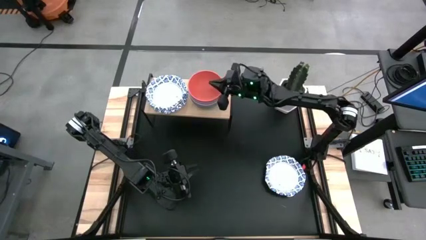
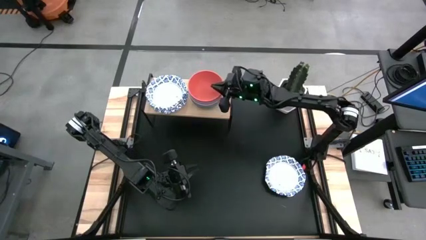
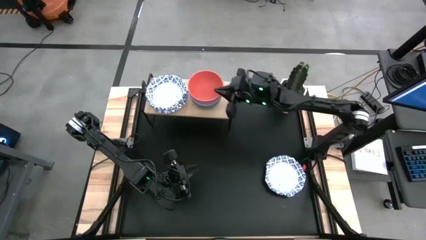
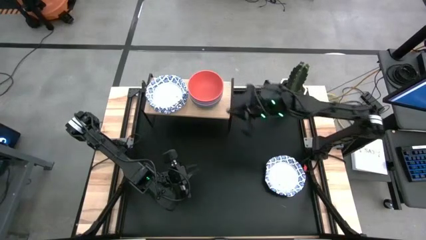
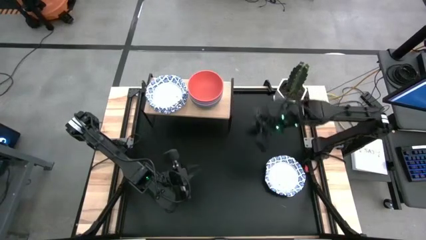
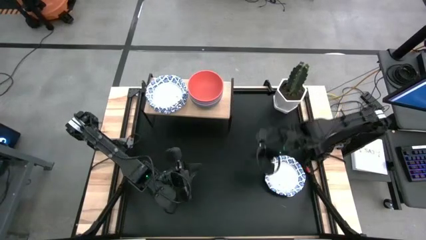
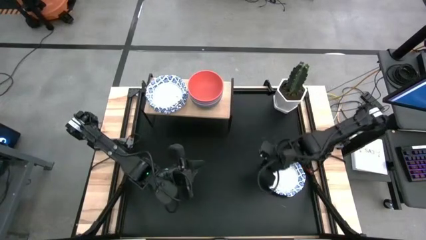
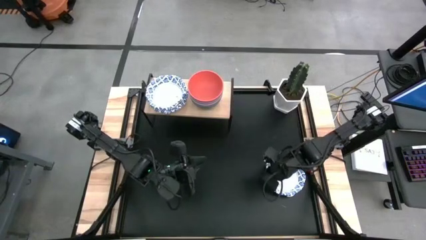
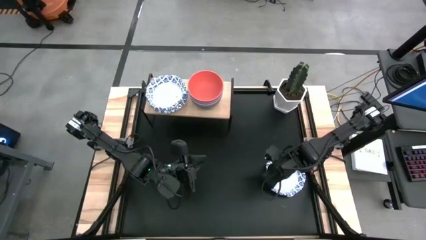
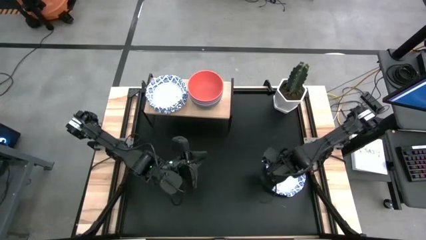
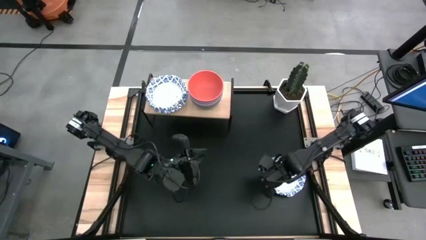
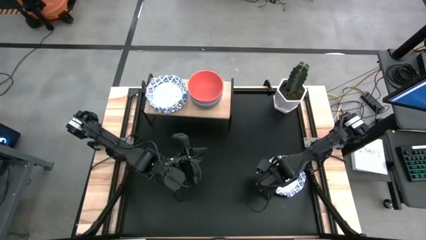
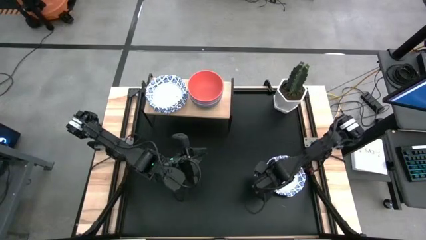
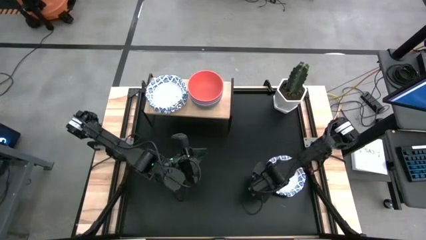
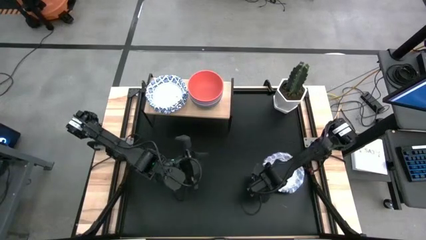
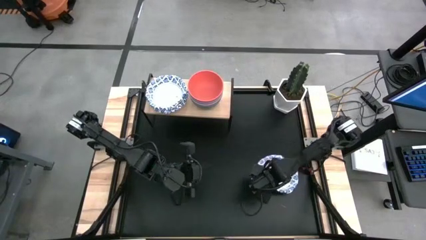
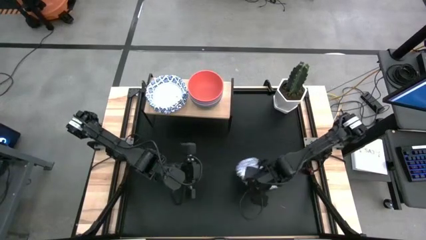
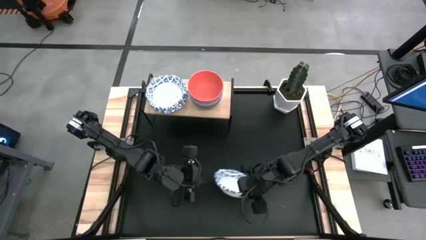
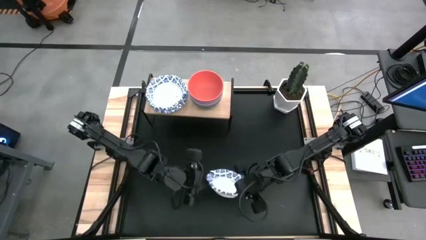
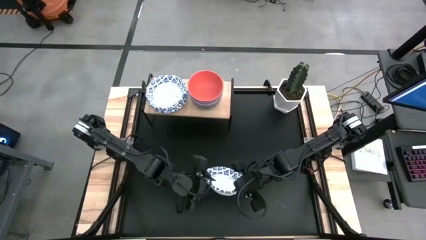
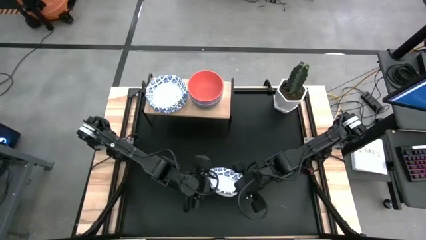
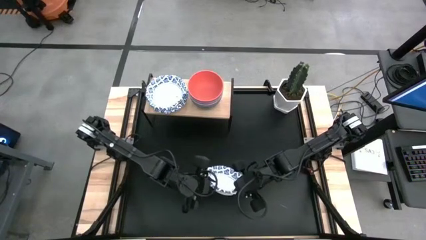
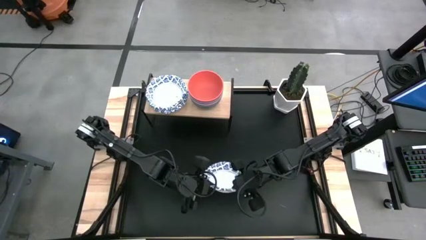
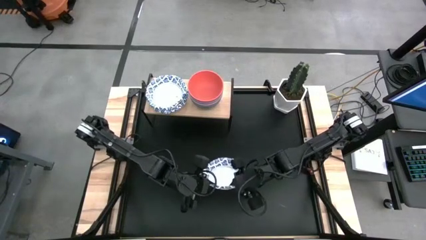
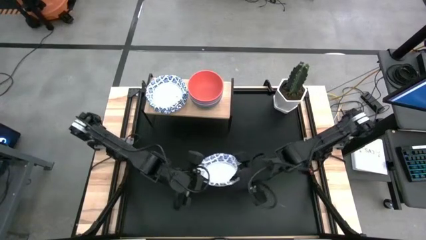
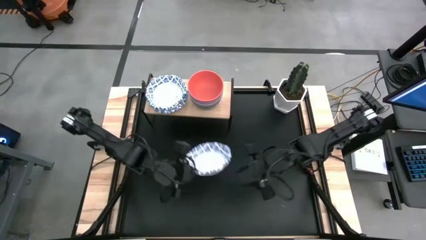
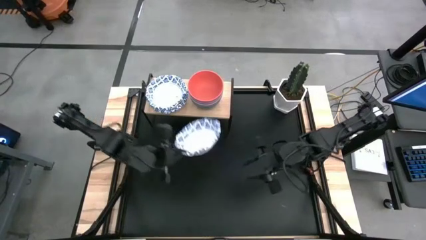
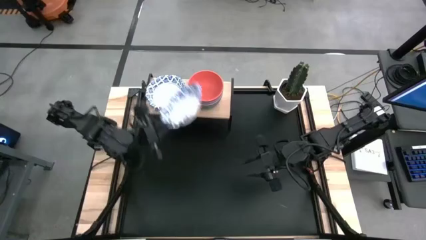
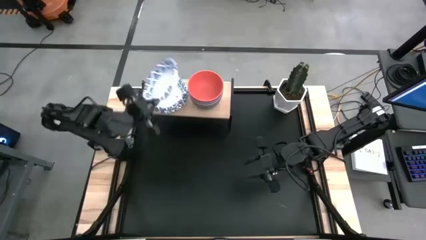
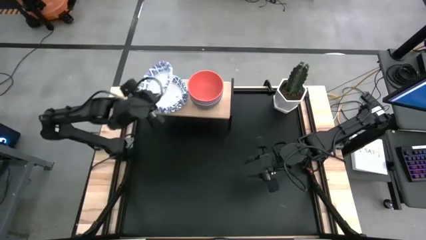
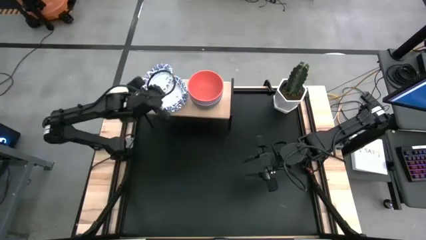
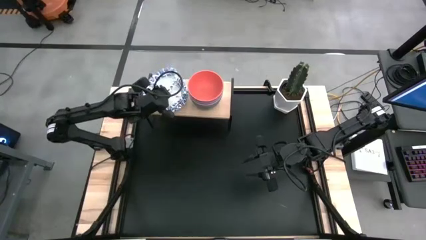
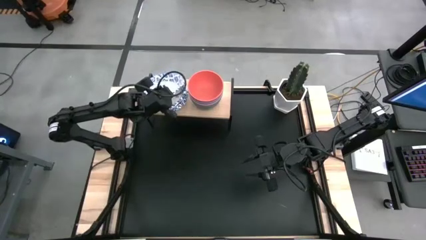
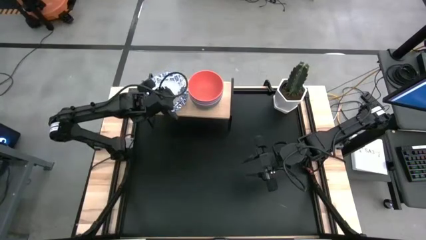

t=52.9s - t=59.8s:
Task: Place and stack bowls onto a shelf
Stack the white patterned bowl on top of the white patterned bowl on the shelf

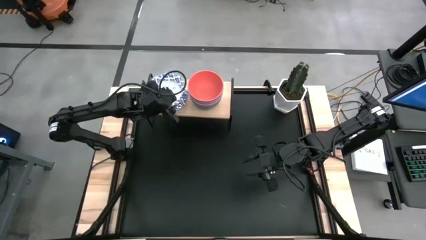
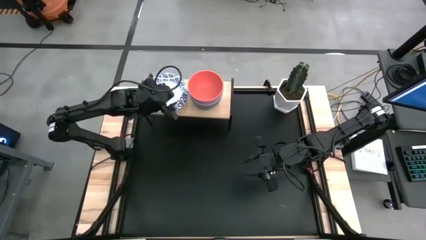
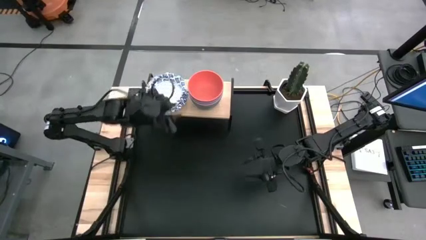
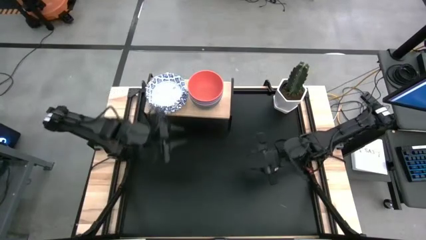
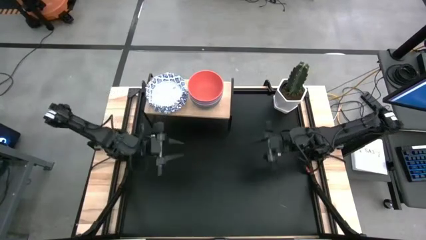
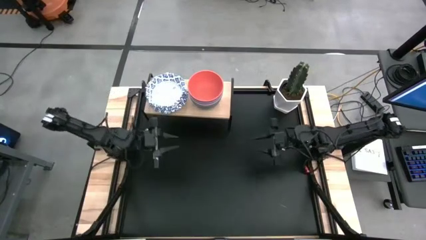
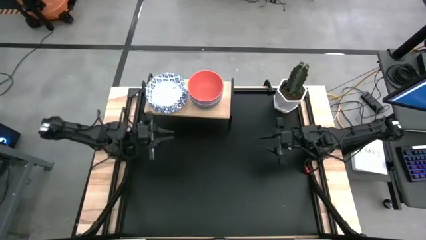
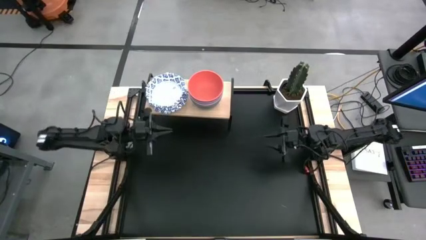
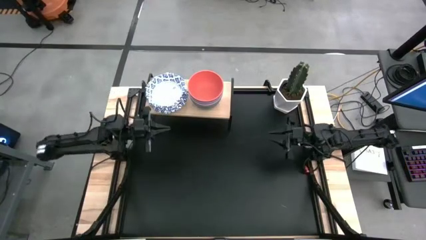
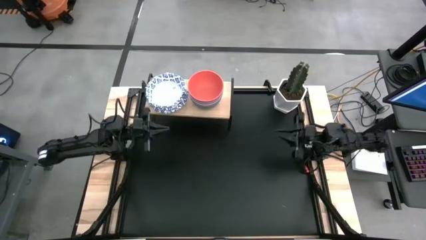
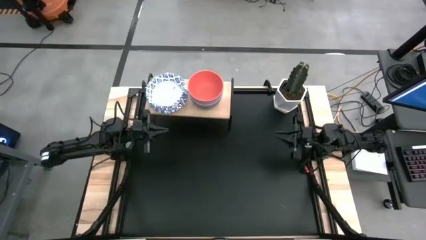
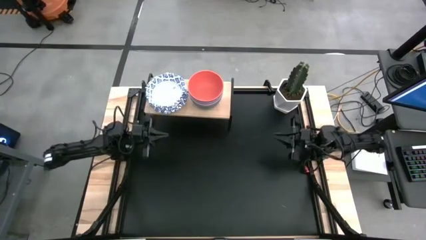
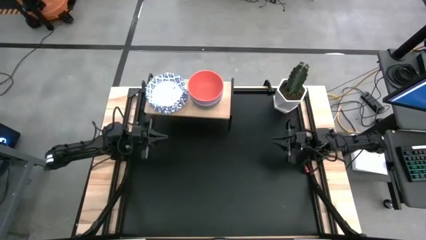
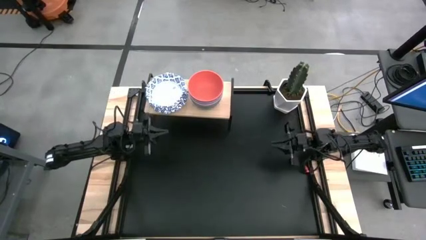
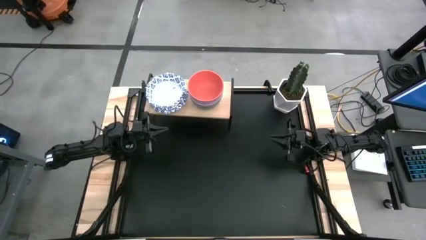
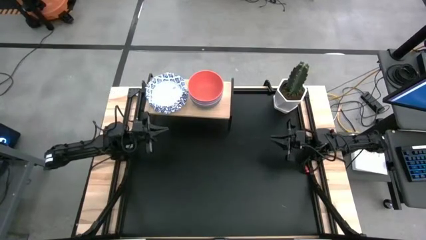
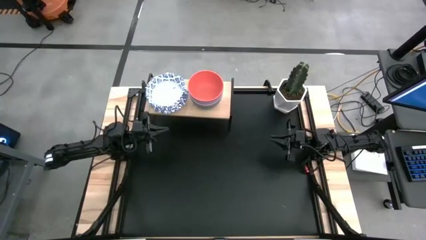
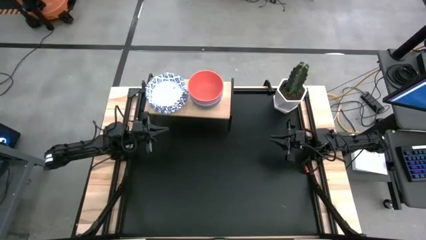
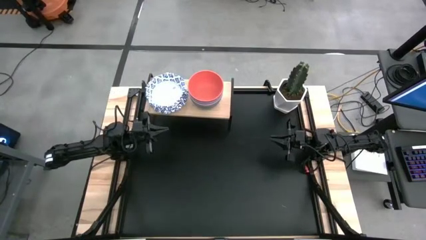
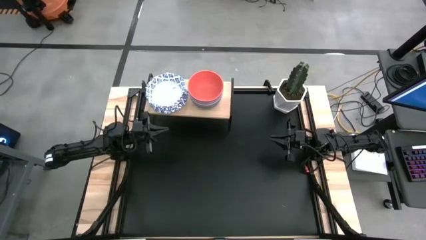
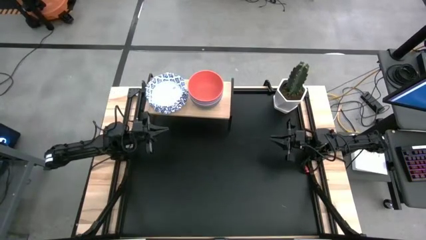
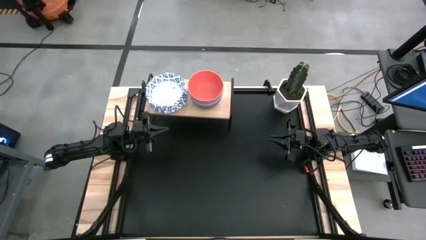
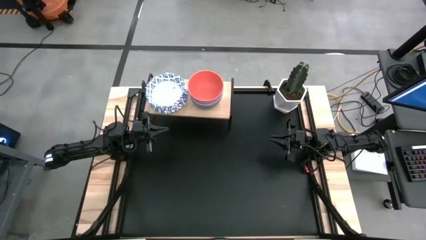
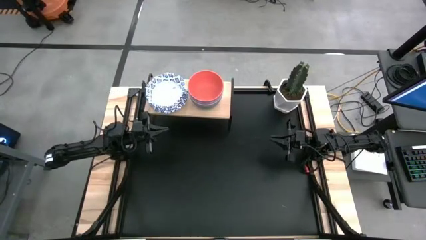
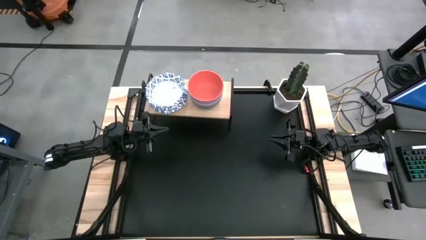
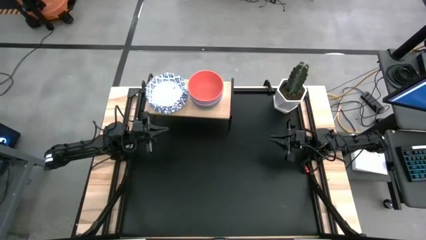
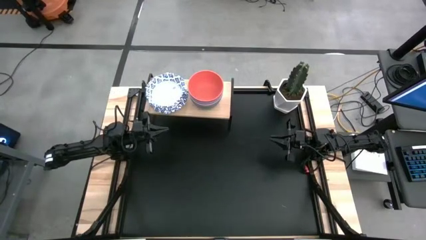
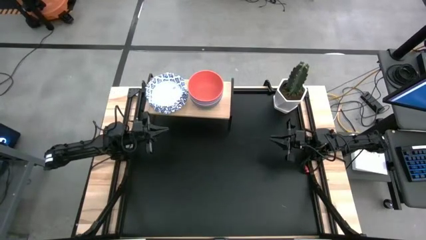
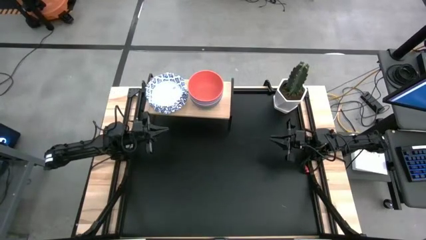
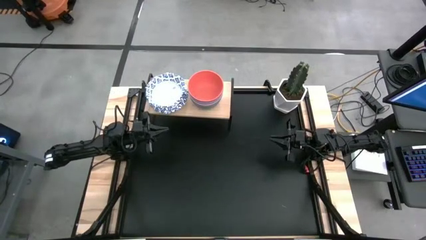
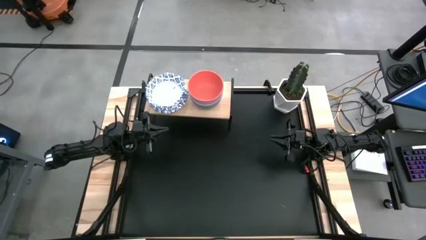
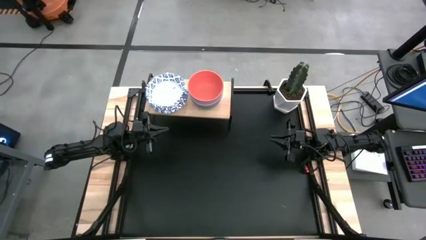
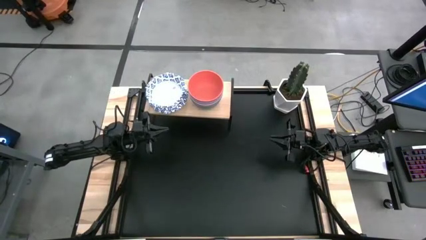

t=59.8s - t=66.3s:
Return to Home Position
